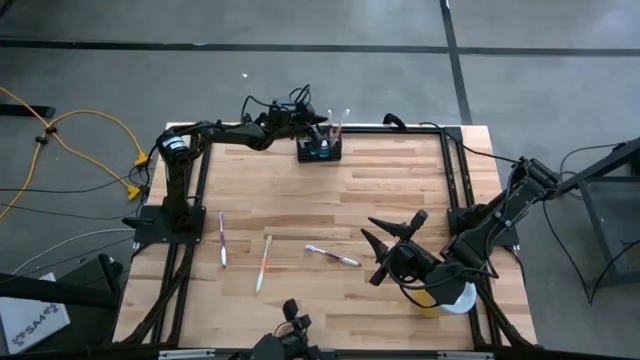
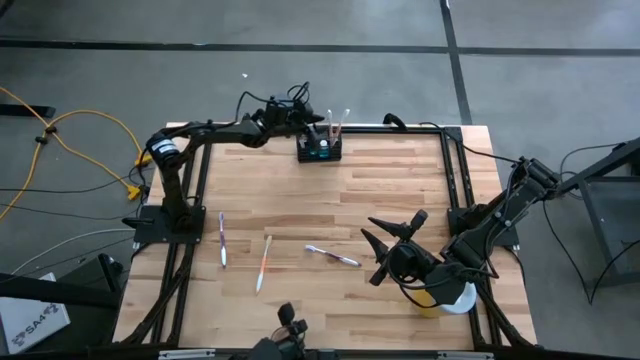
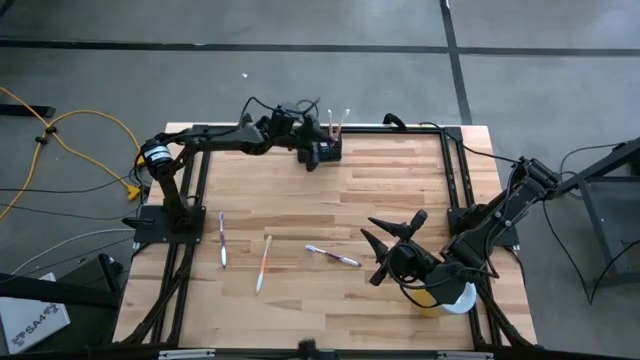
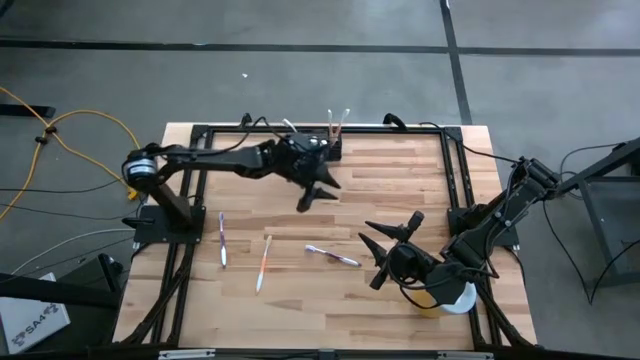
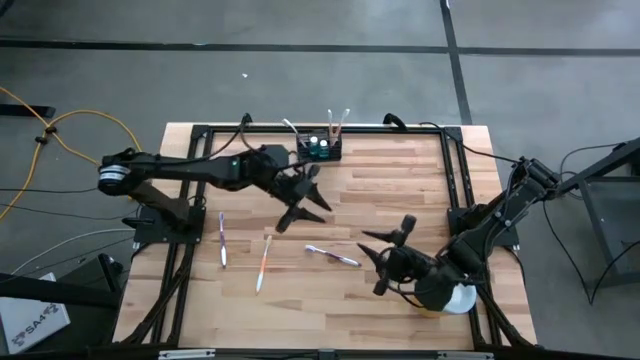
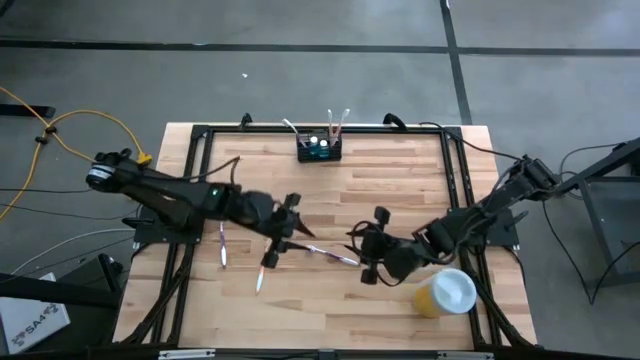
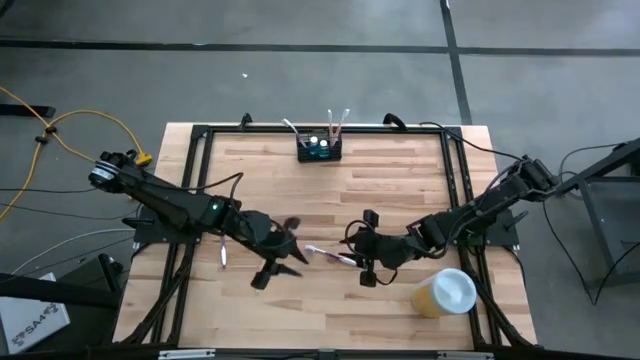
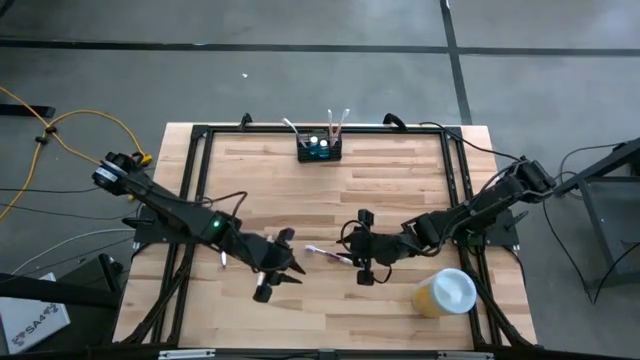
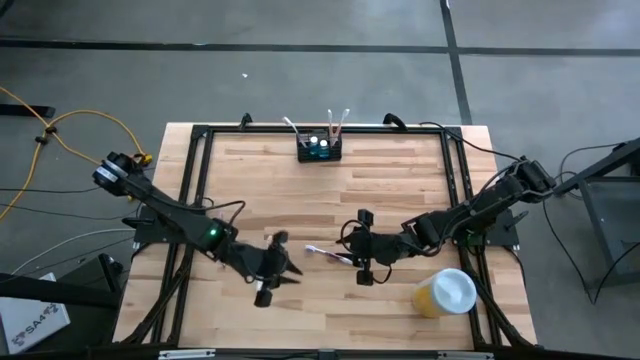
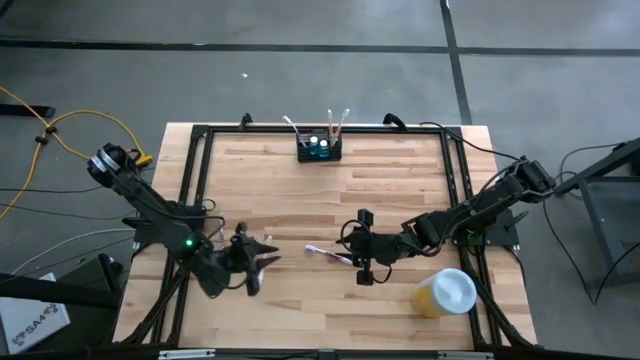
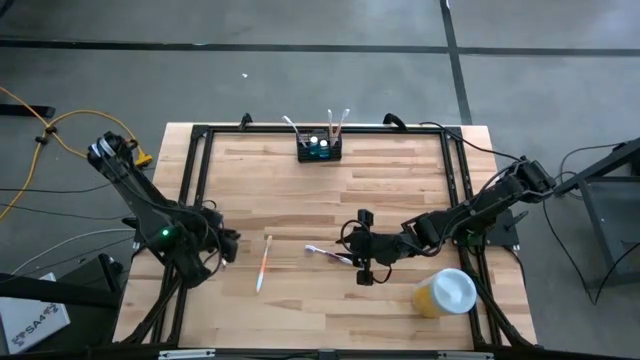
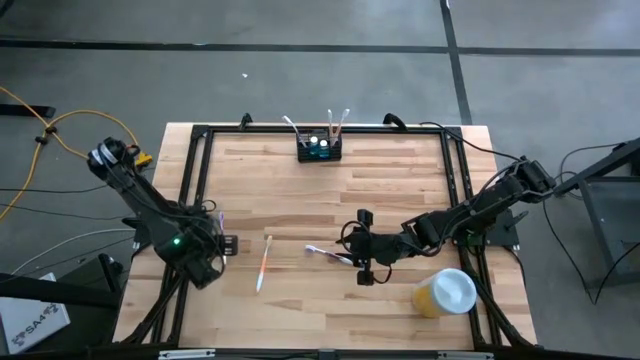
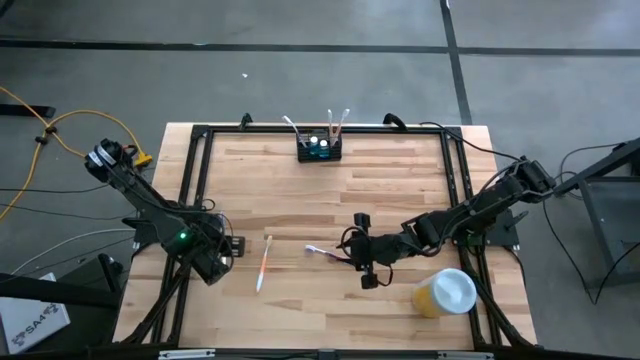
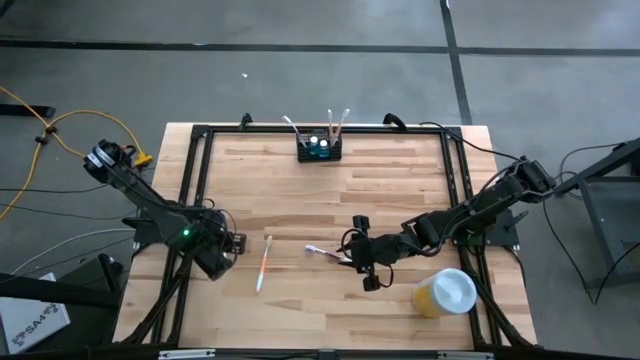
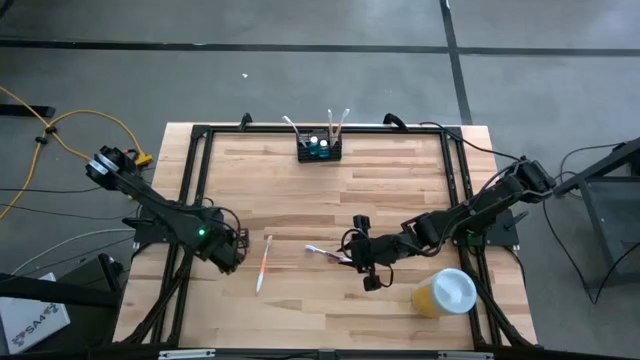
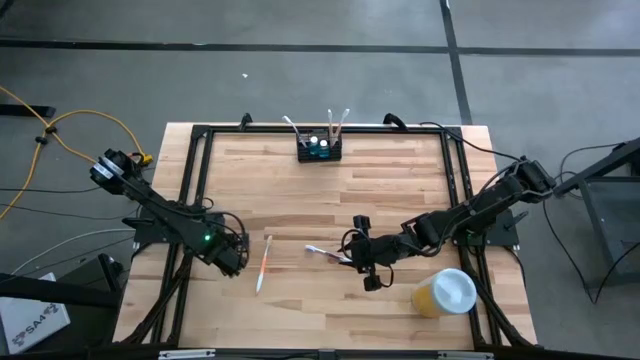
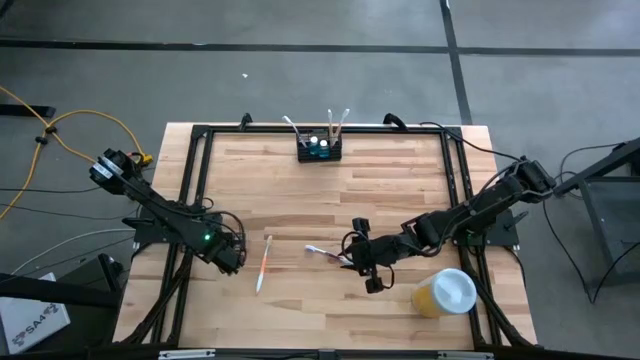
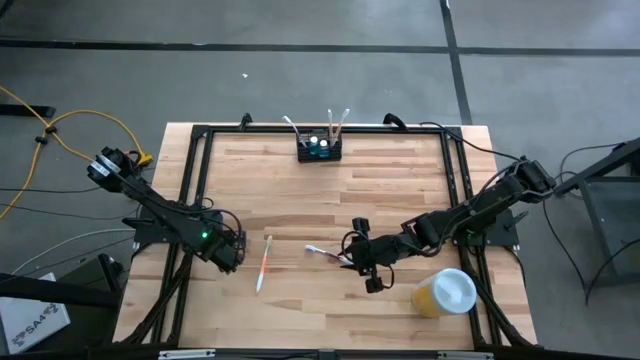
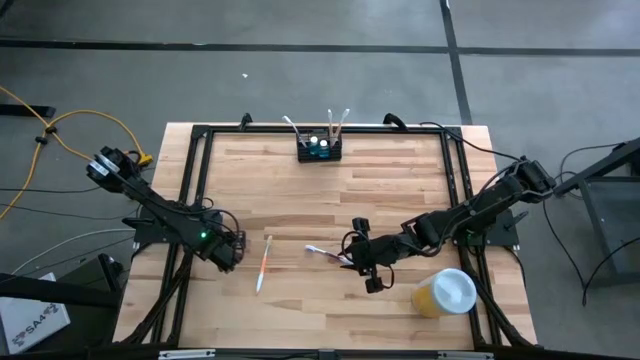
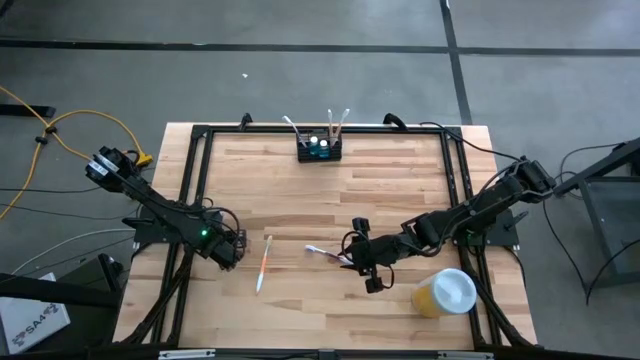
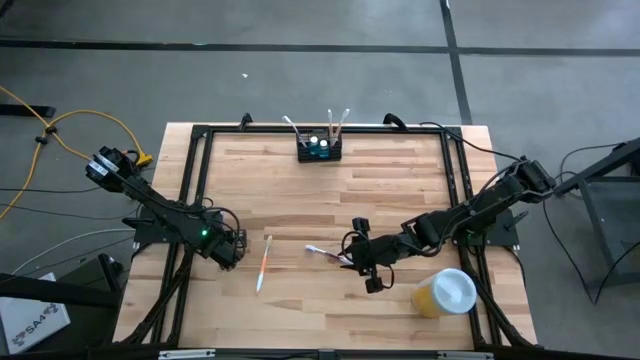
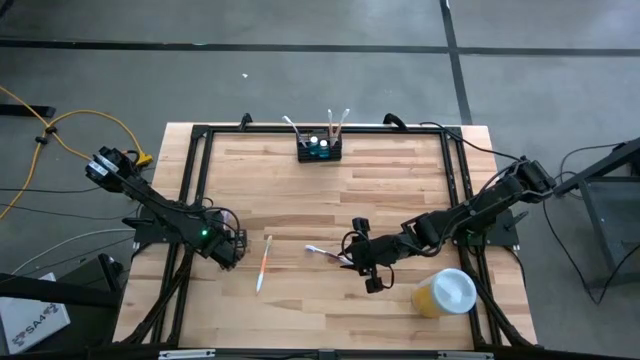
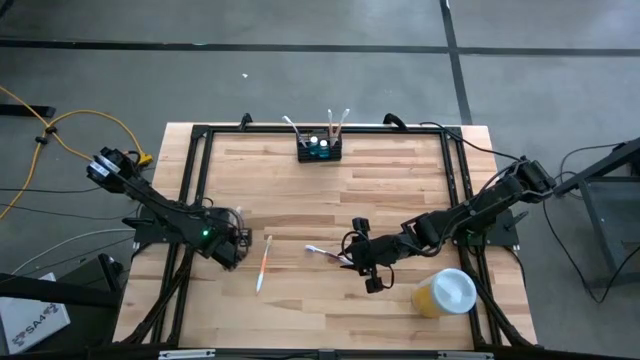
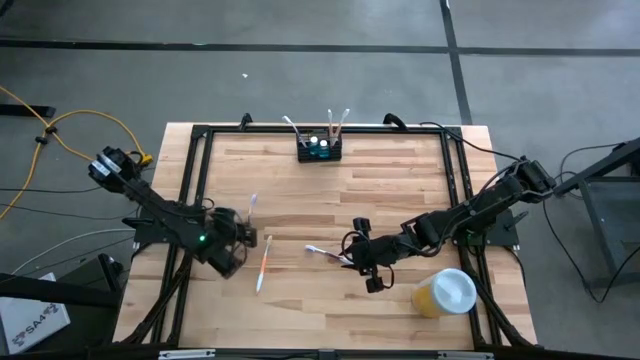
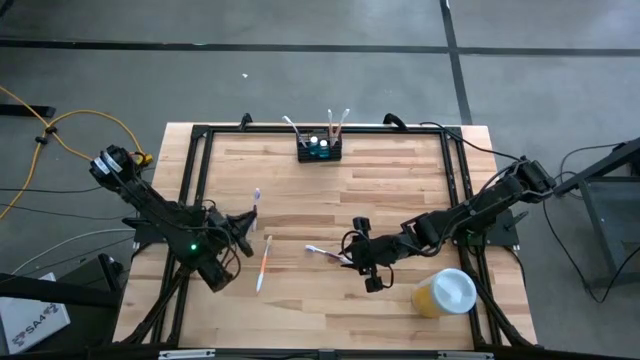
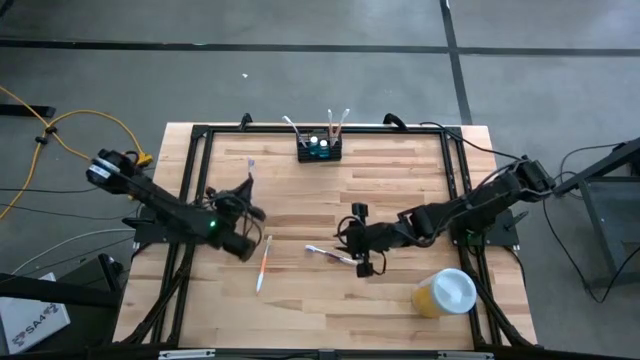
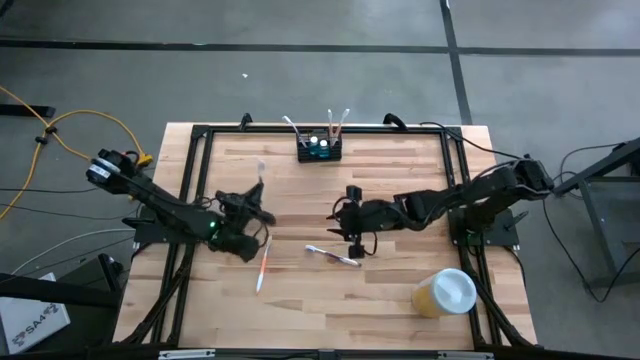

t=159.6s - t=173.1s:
Task: Pick & Place toothbrushing station
Put the left purple toothbrush into the wire organizer

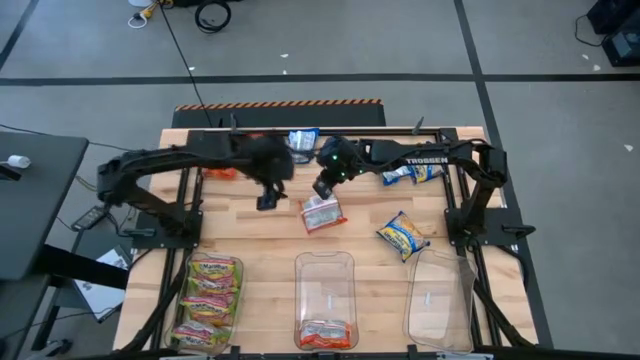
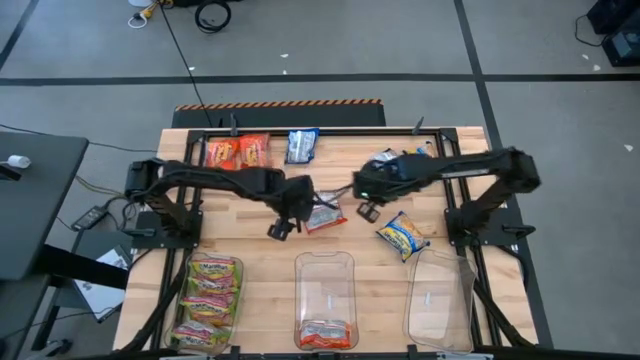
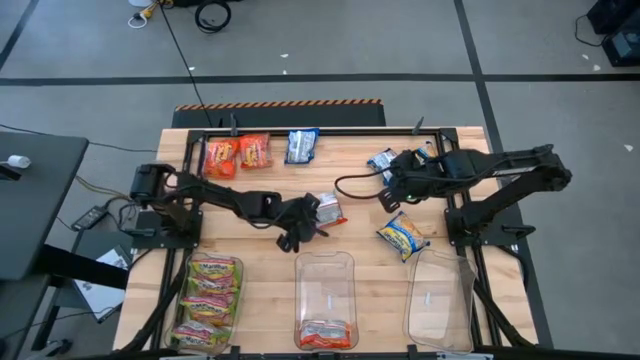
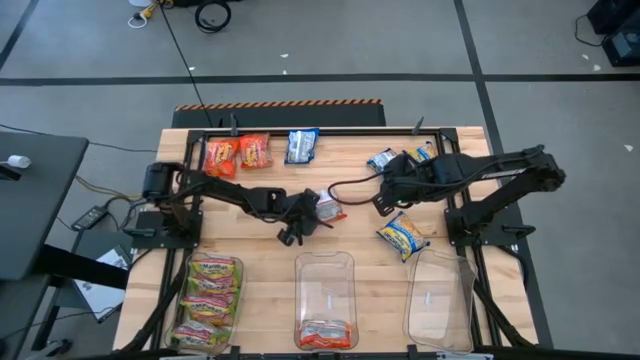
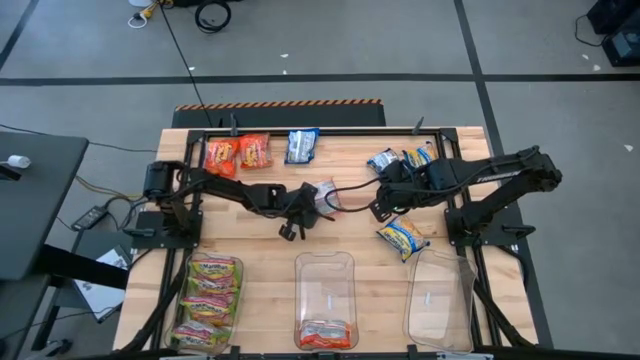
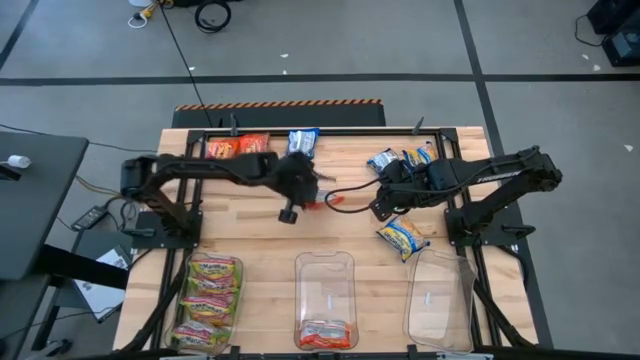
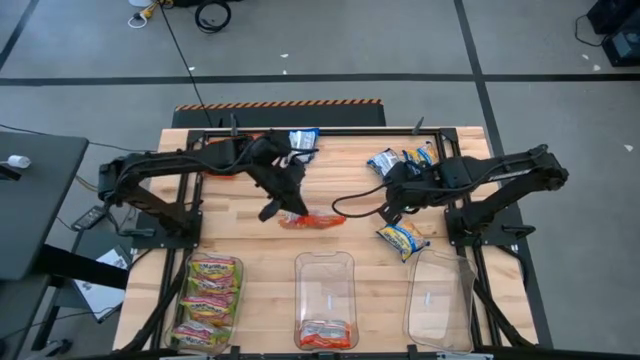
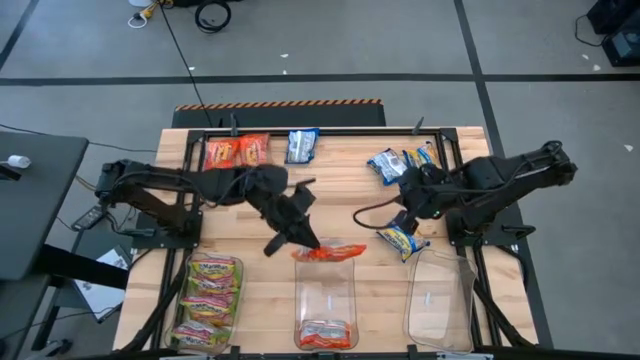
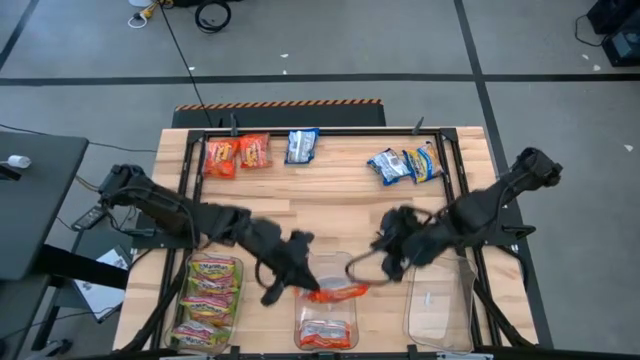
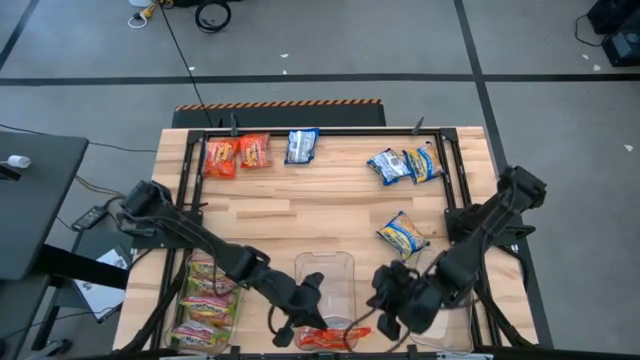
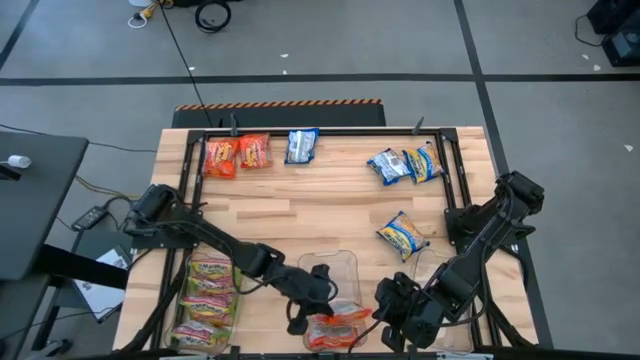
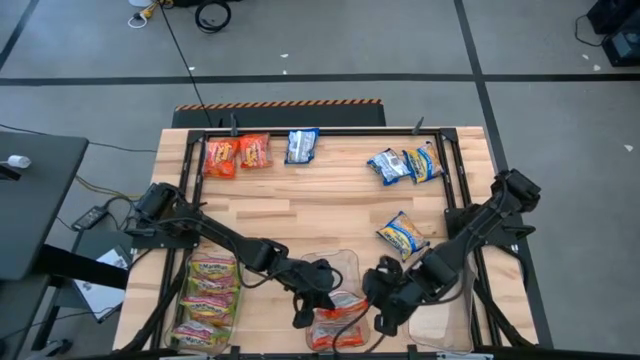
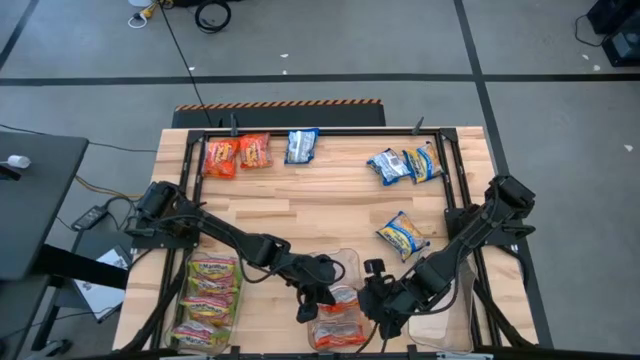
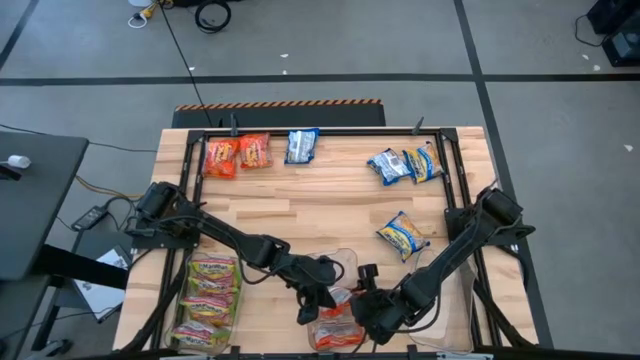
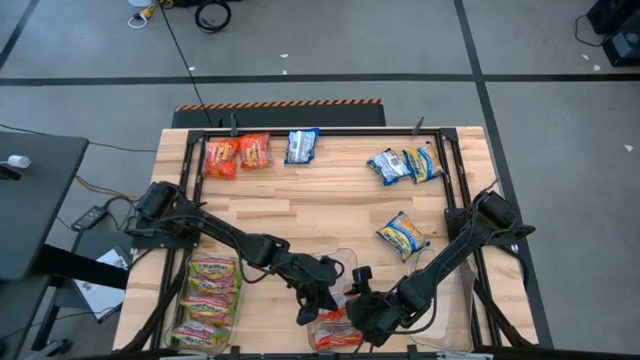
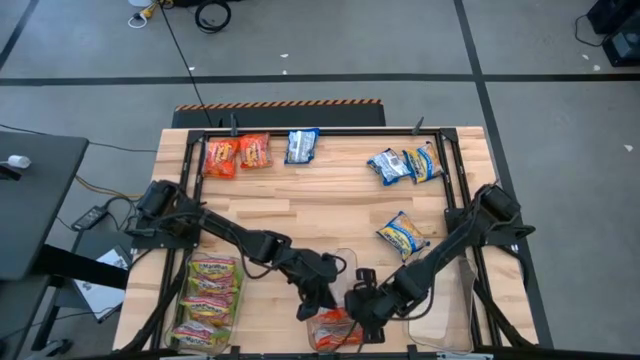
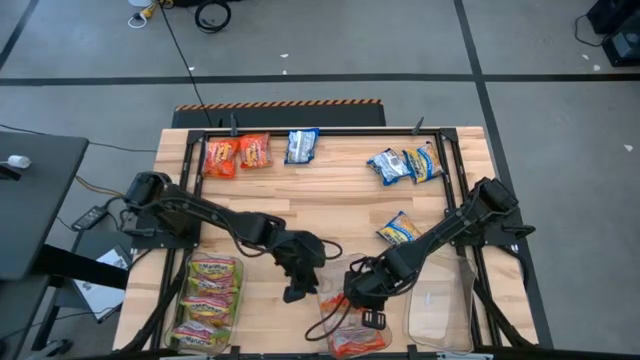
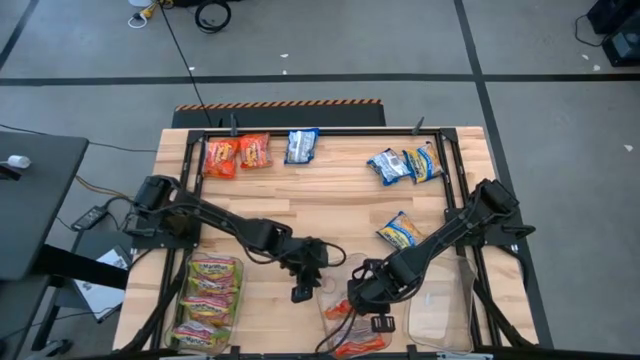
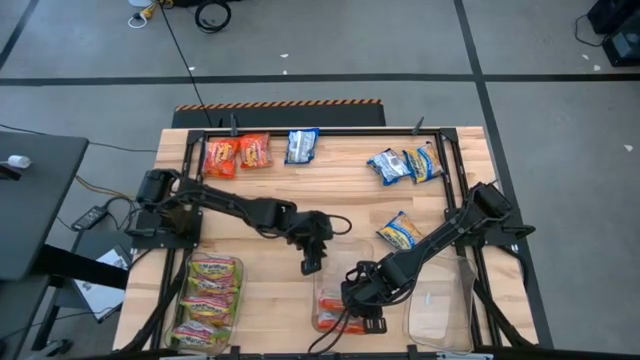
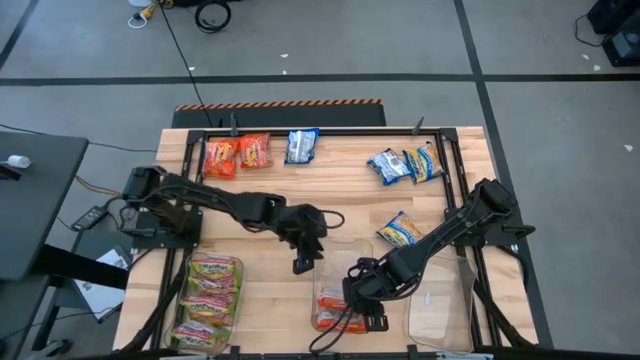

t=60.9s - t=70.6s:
Task: Sort Maruchan noodles
Put the orange noodle pack into the middle transparent bin
